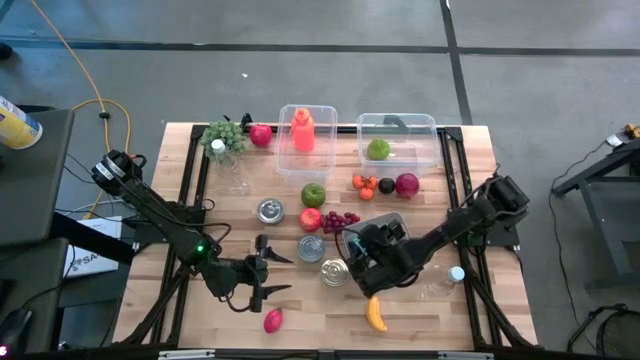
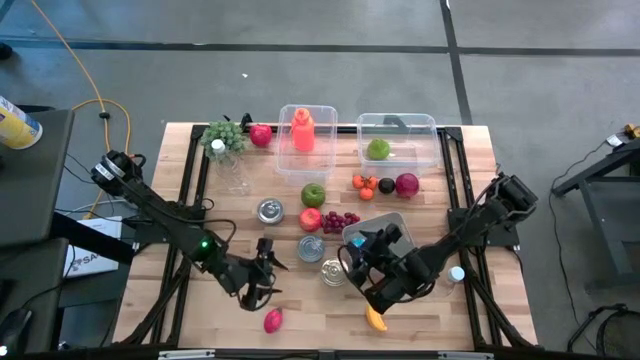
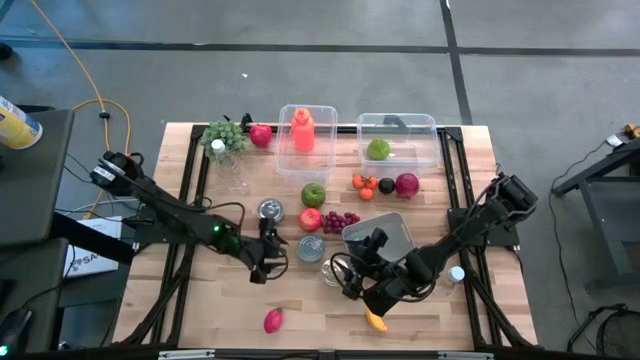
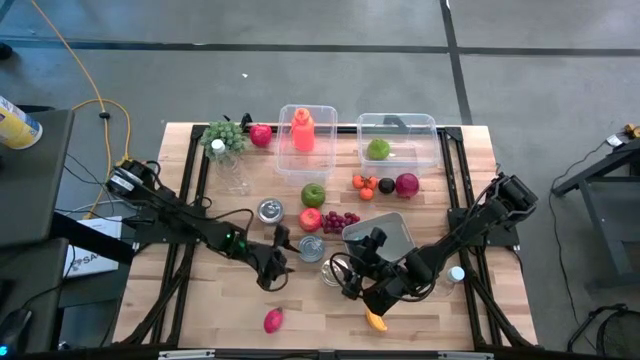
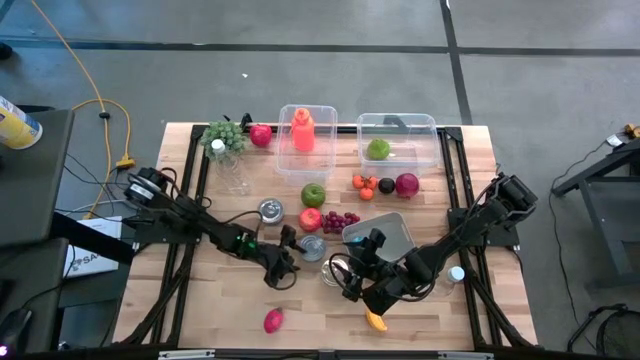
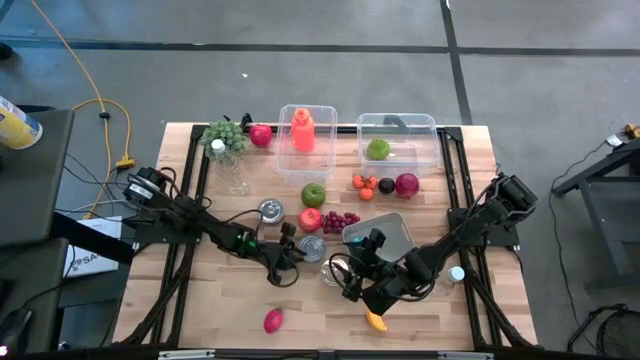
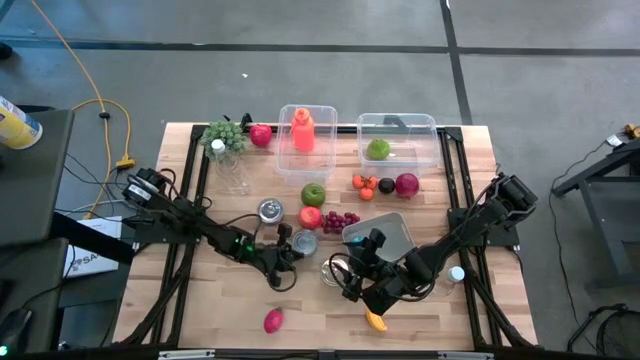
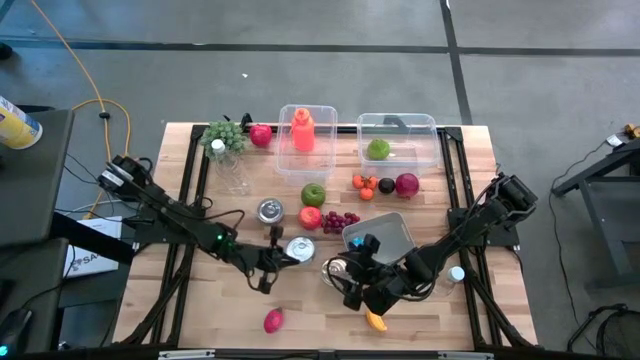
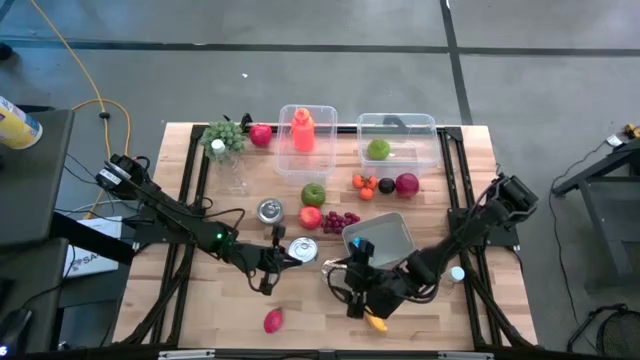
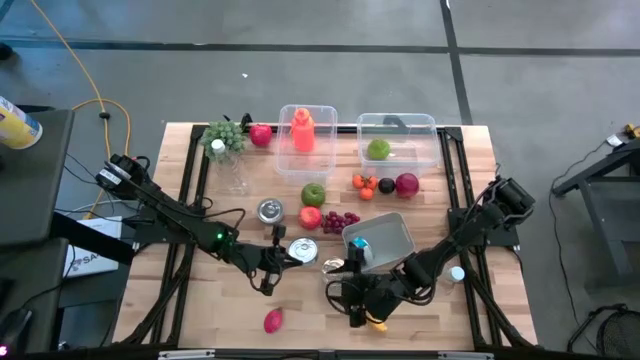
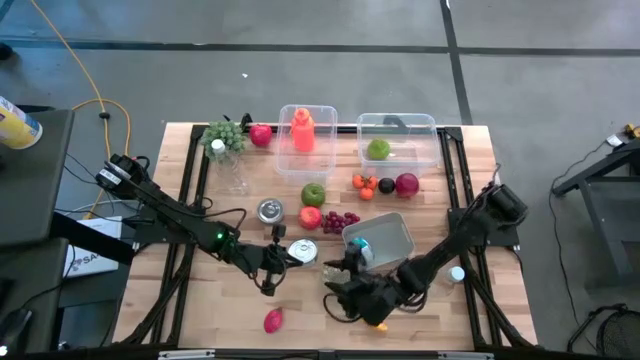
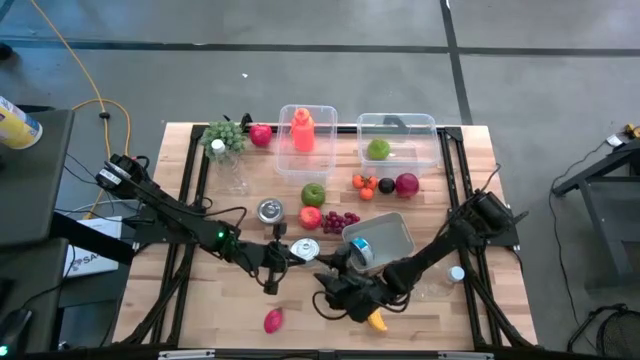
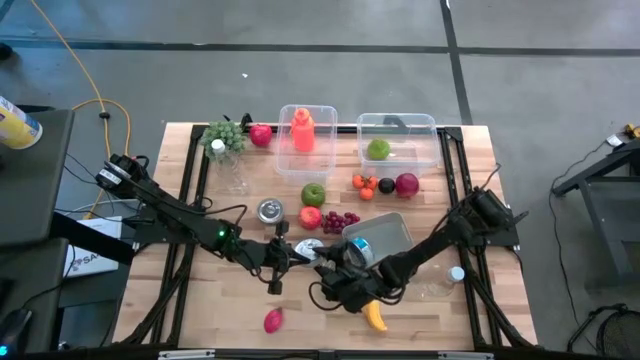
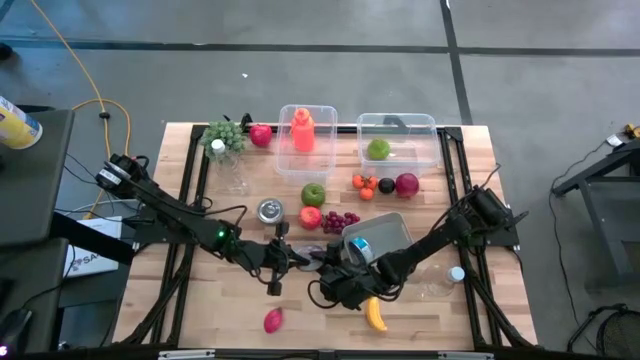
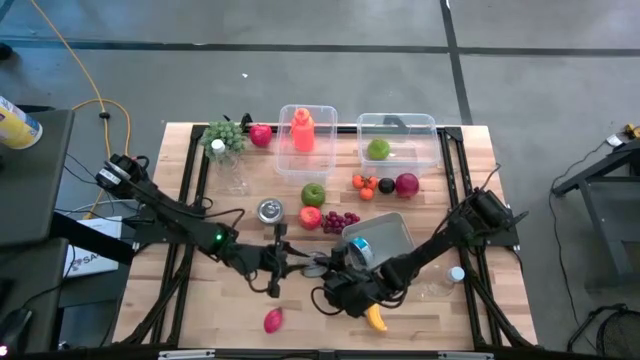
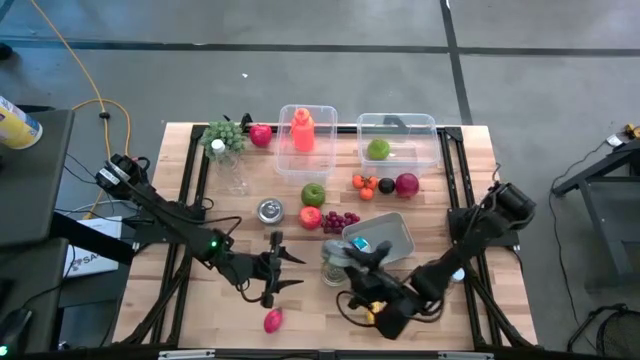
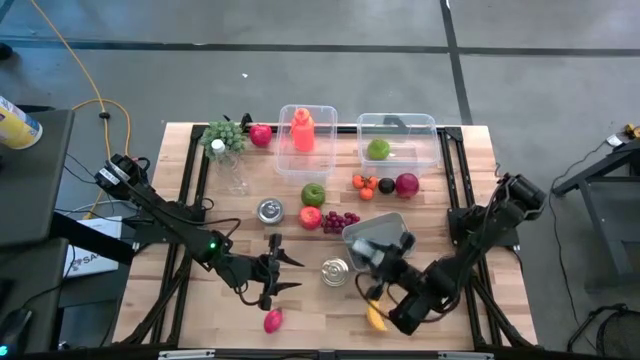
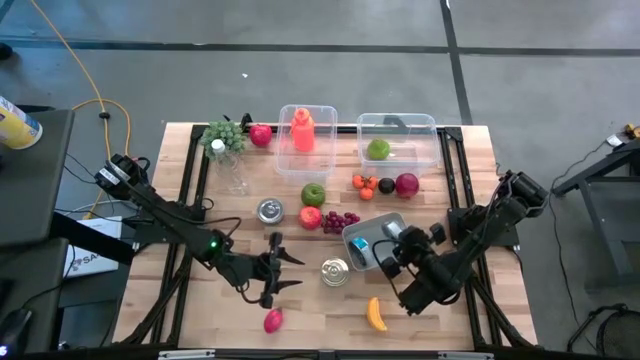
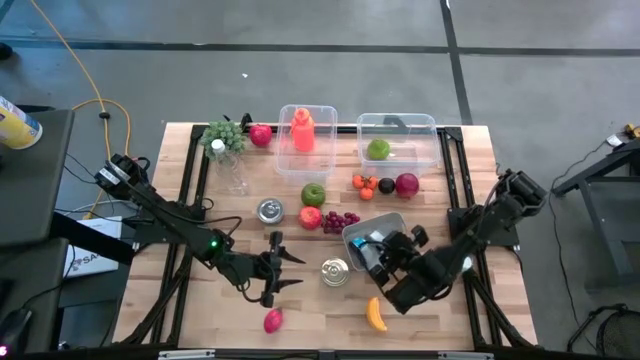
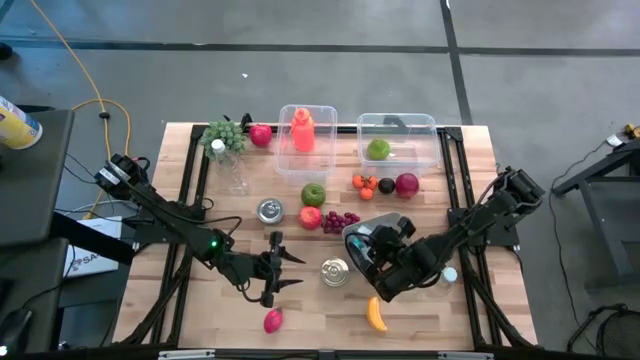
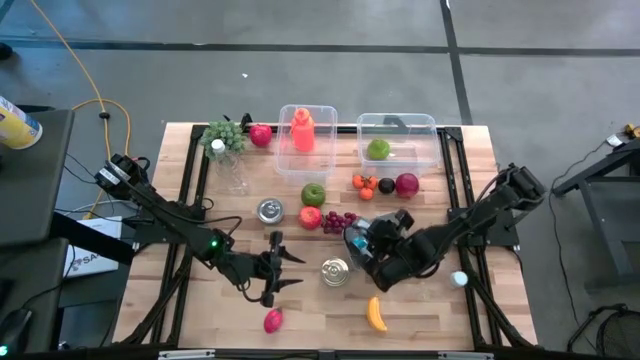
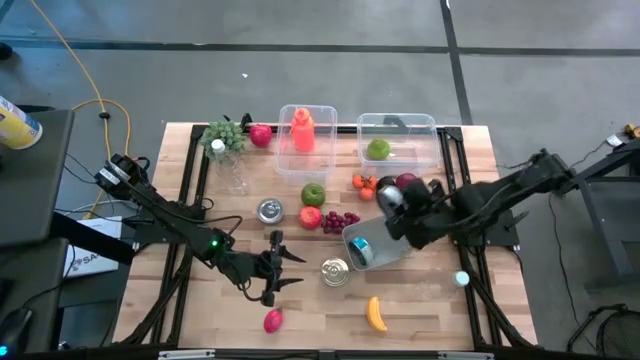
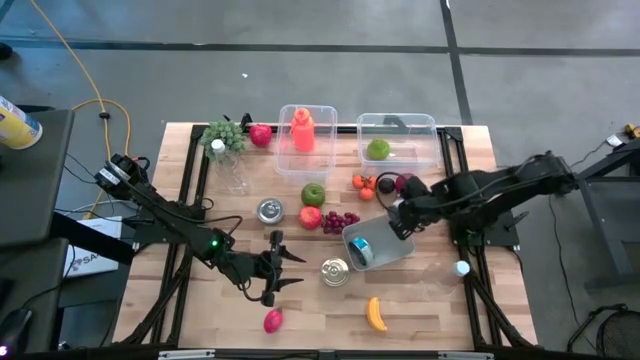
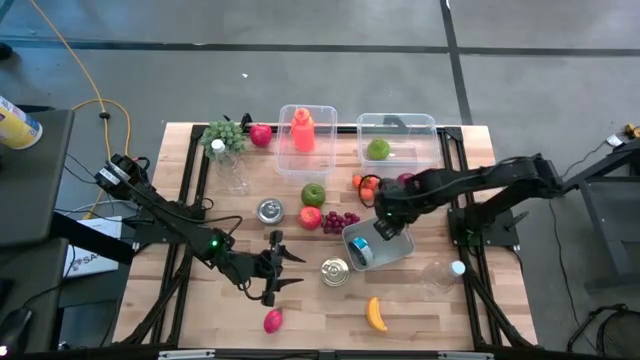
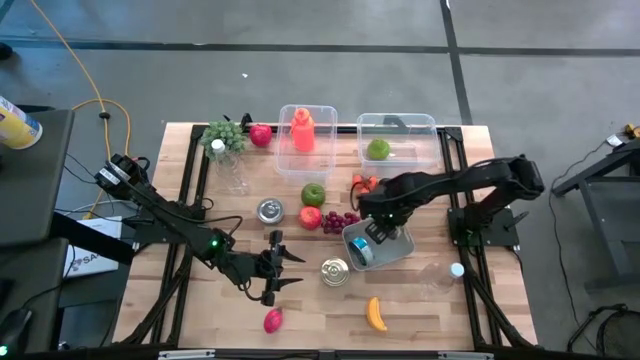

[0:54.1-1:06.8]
Task: Pick & Place Food Item
Put the bottom green tuna can into the gray bin

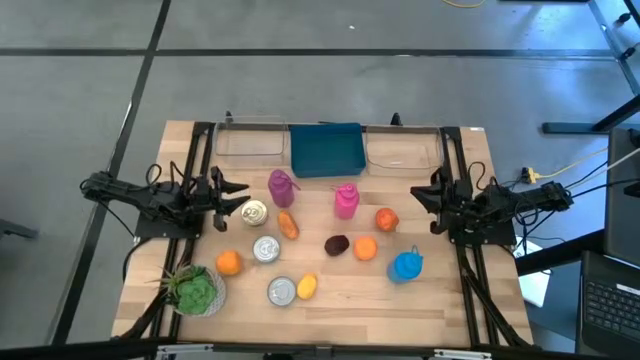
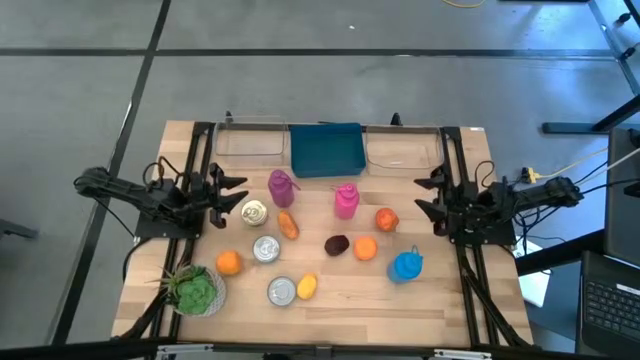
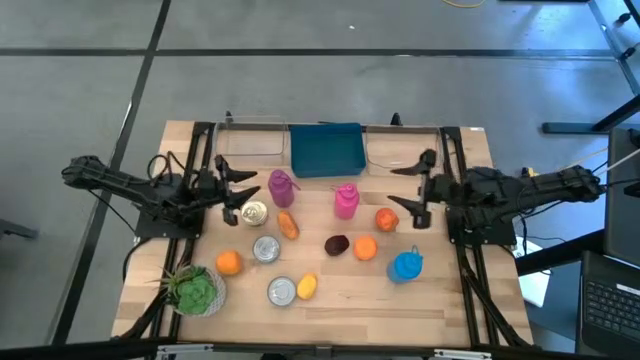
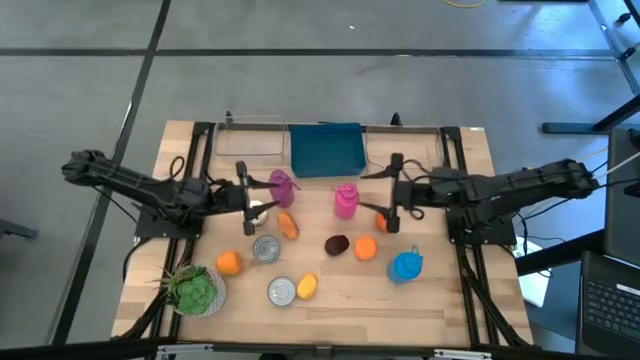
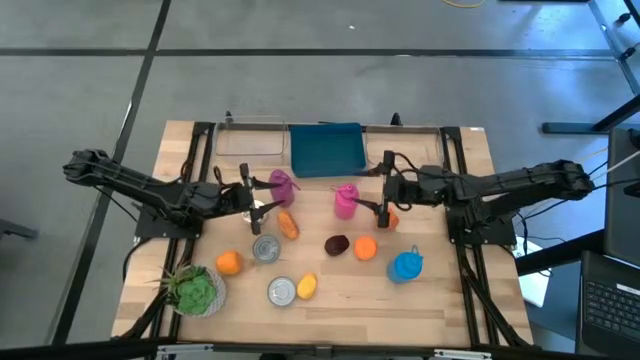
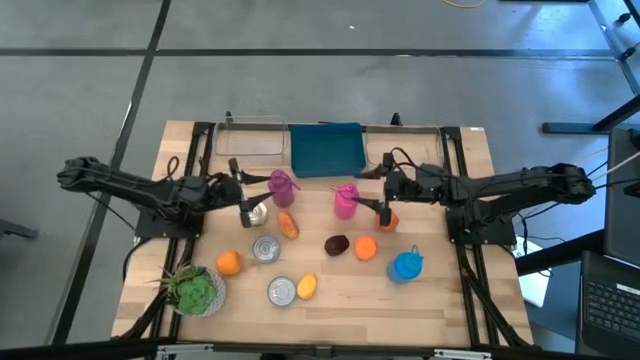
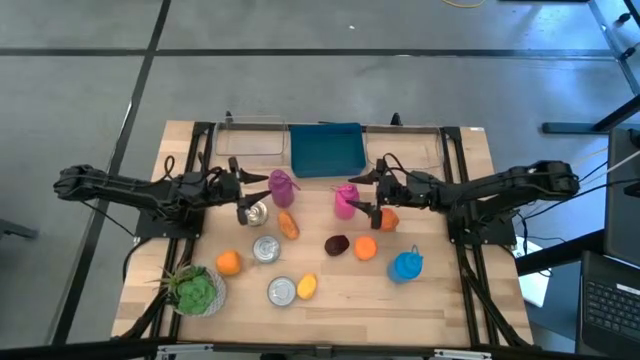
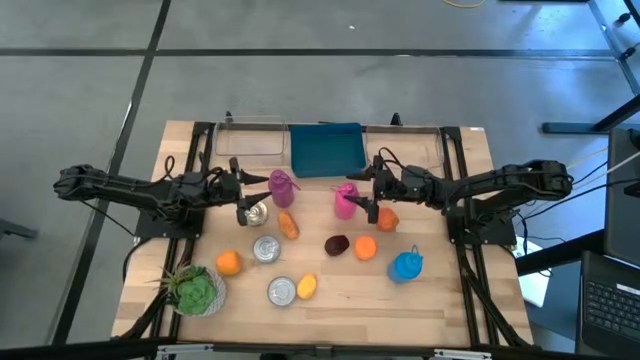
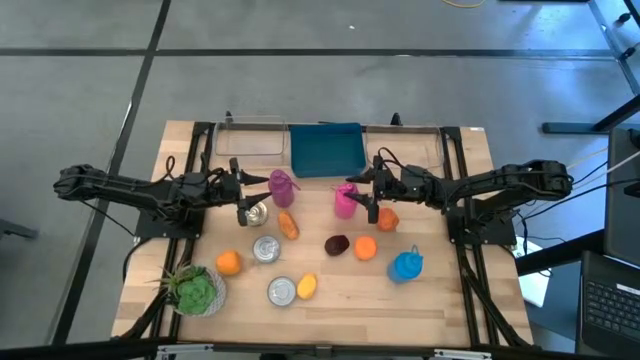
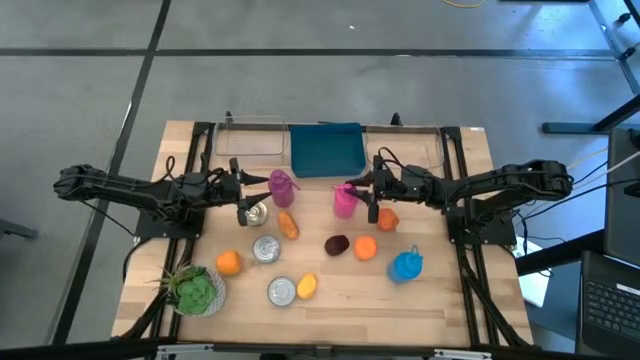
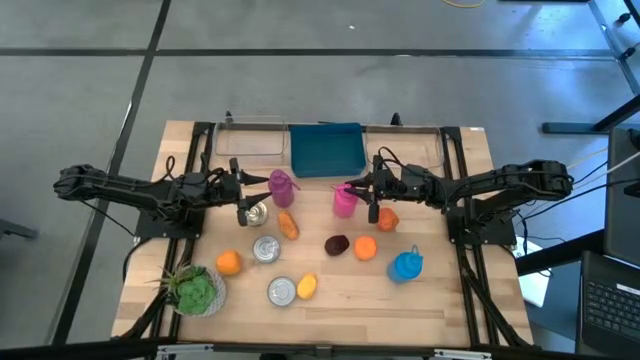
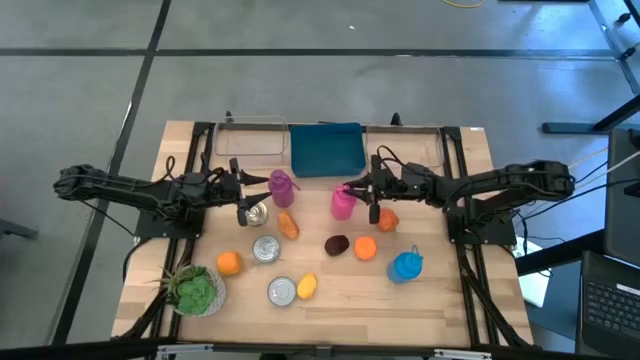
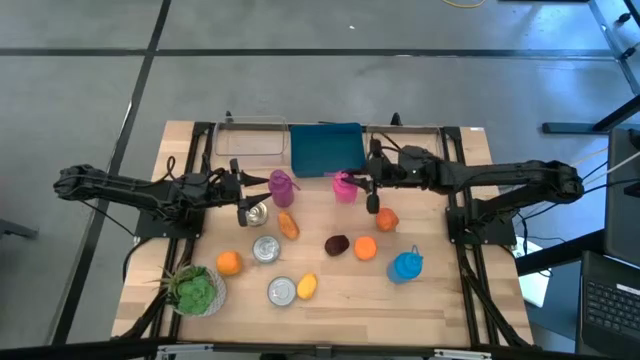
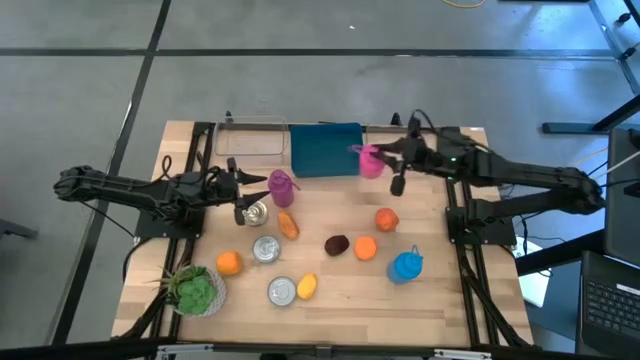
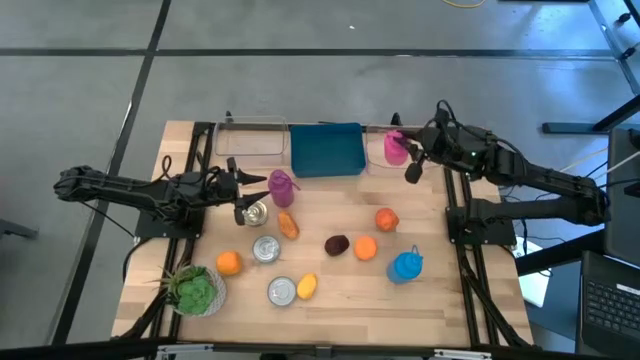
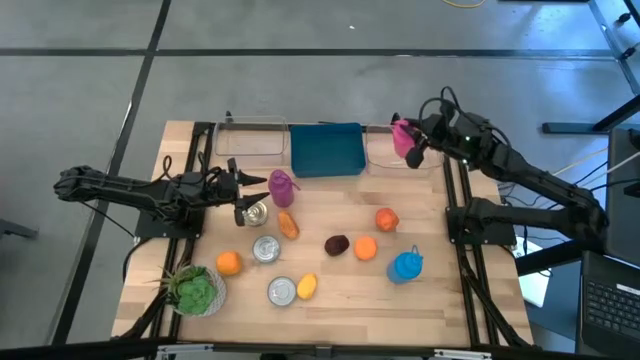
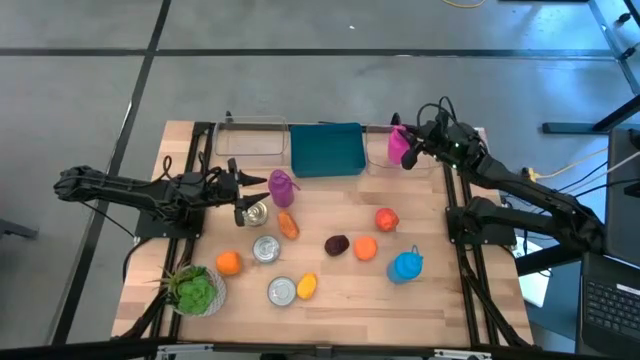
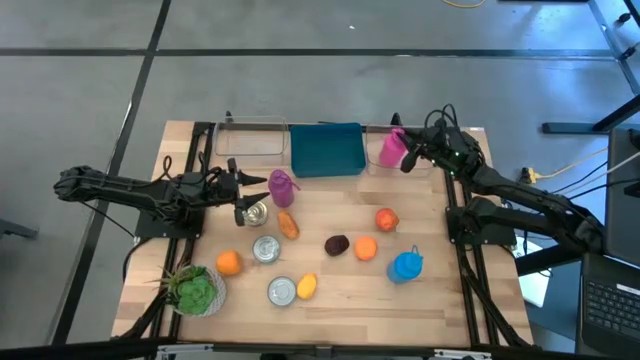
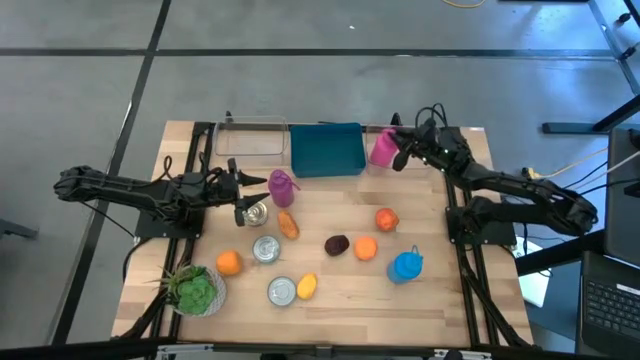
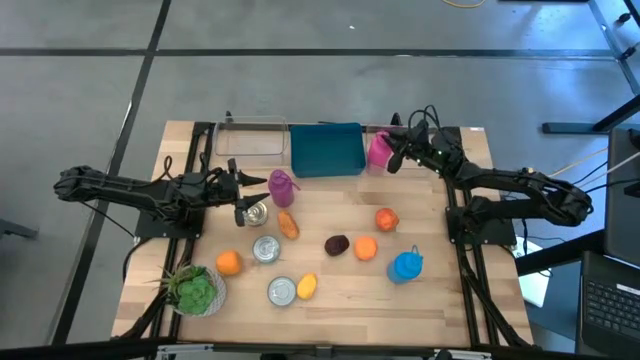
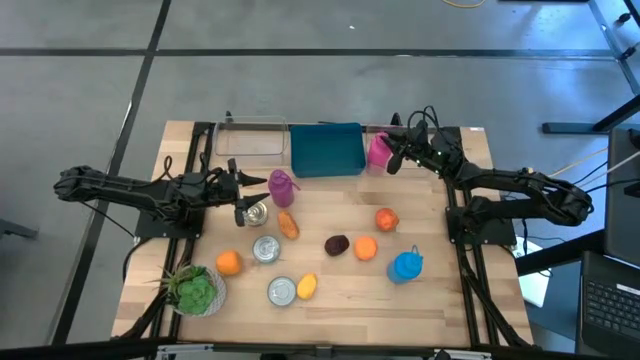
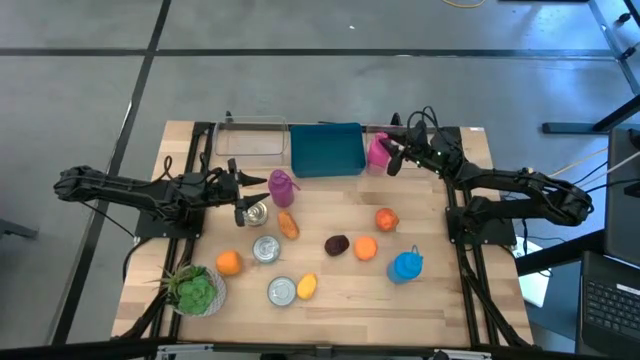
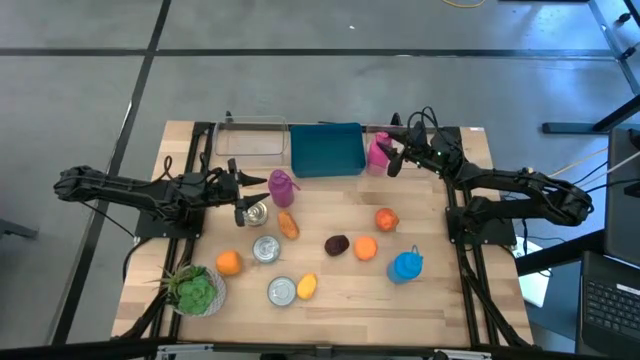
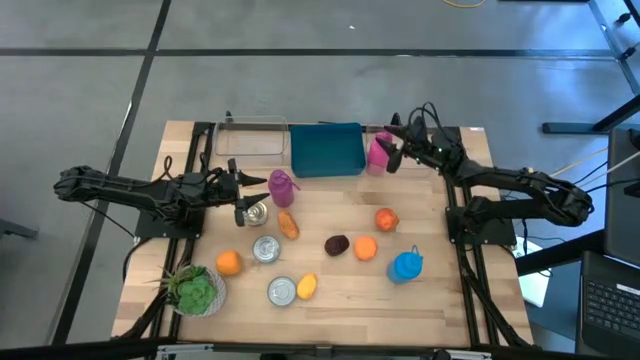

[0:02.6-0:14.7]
Task: Pick & Place Food Item
Put the pink water bottle into the right transparent bin
